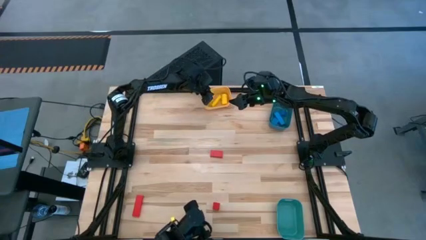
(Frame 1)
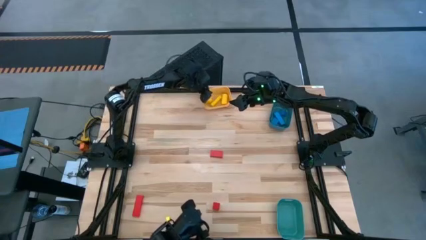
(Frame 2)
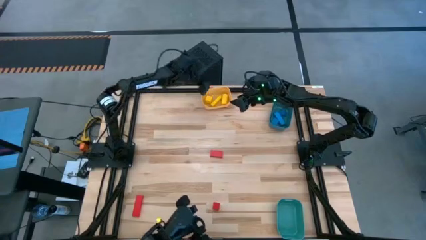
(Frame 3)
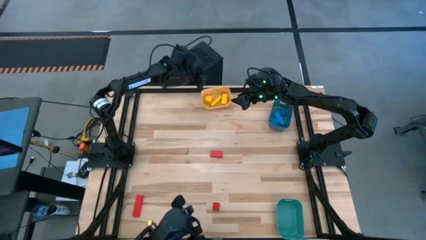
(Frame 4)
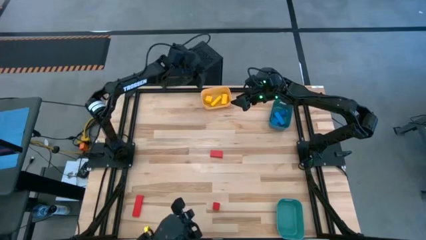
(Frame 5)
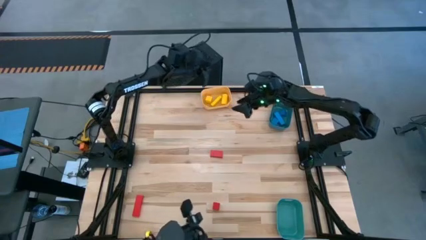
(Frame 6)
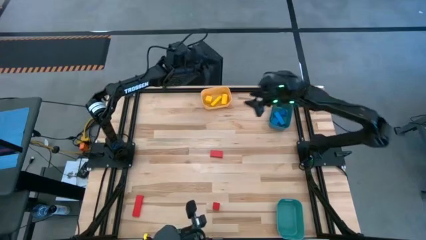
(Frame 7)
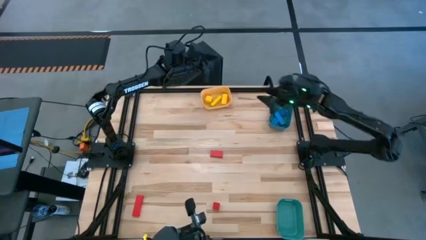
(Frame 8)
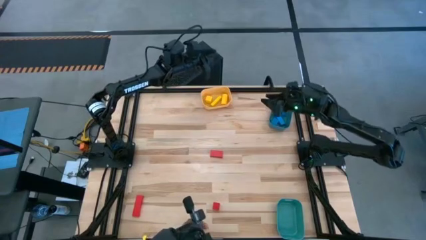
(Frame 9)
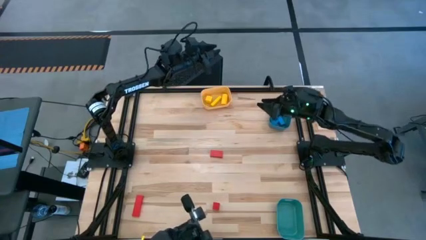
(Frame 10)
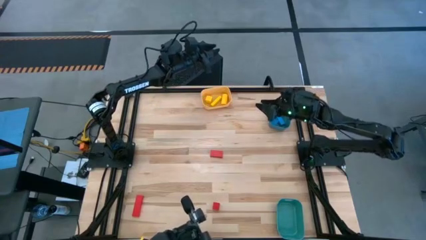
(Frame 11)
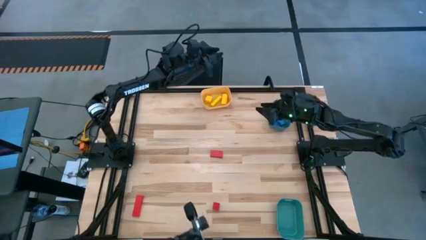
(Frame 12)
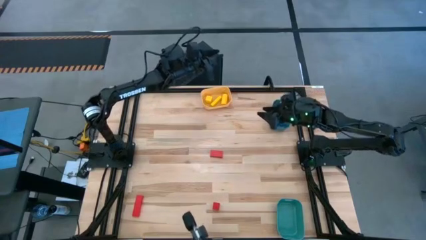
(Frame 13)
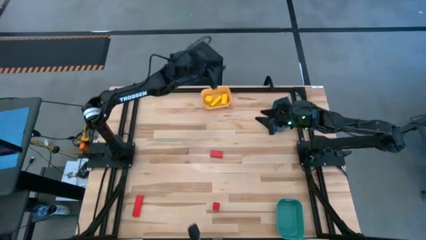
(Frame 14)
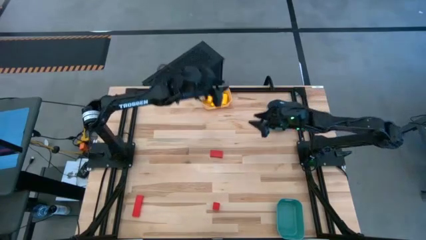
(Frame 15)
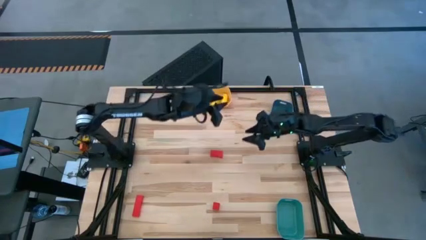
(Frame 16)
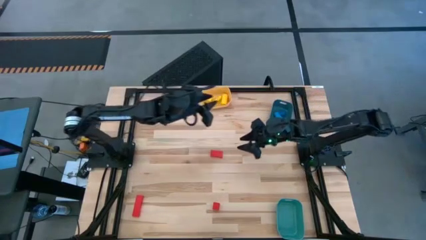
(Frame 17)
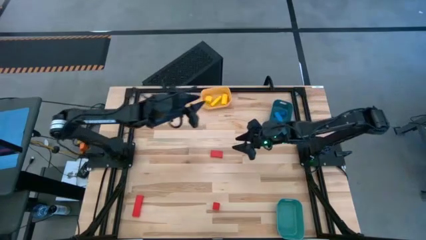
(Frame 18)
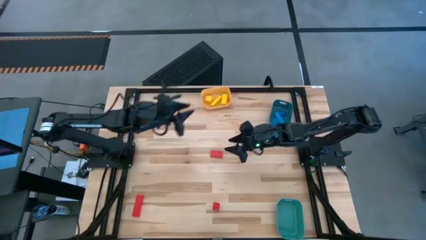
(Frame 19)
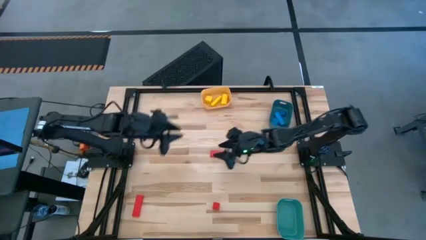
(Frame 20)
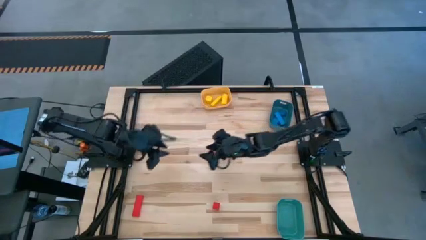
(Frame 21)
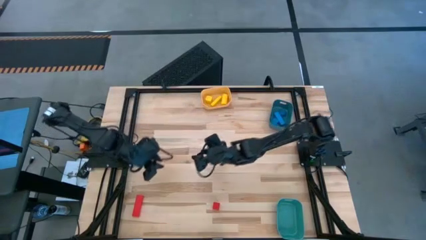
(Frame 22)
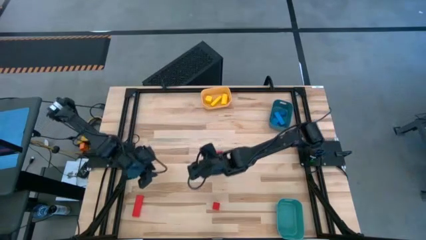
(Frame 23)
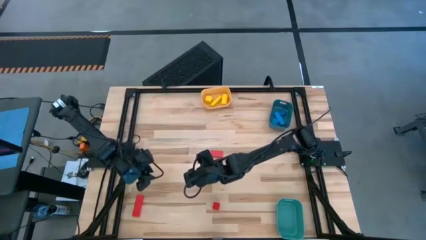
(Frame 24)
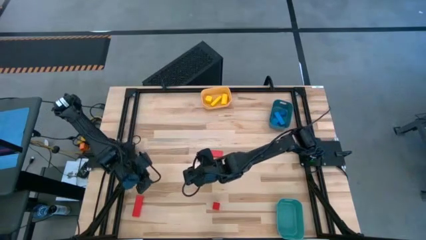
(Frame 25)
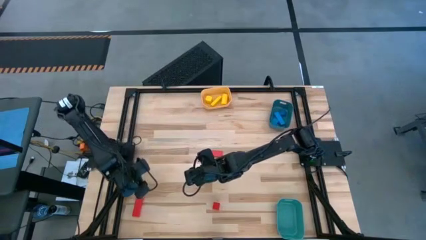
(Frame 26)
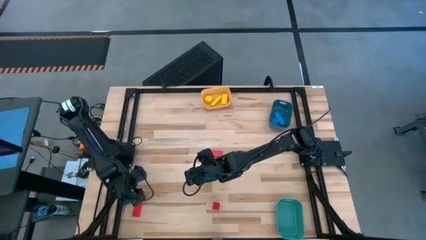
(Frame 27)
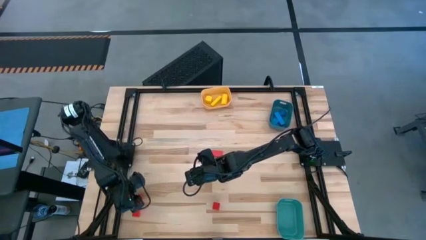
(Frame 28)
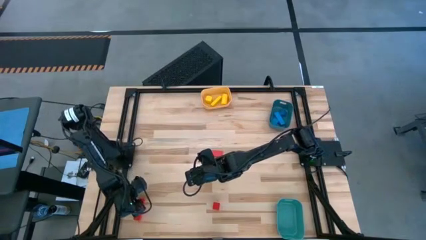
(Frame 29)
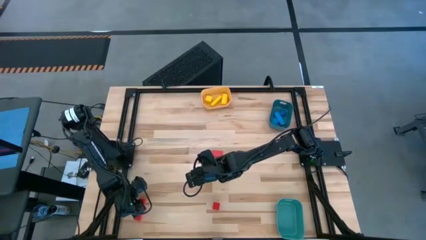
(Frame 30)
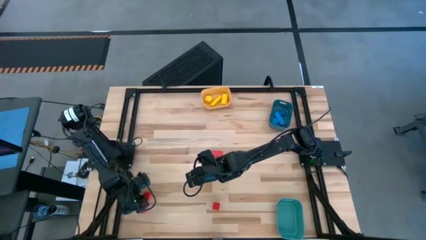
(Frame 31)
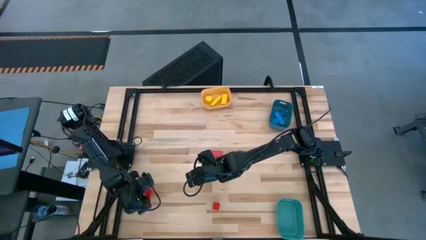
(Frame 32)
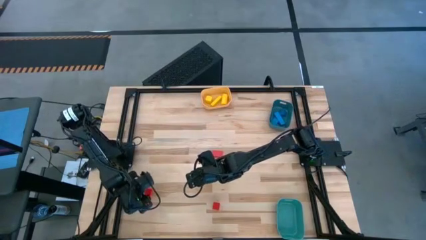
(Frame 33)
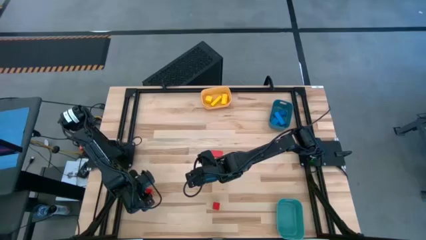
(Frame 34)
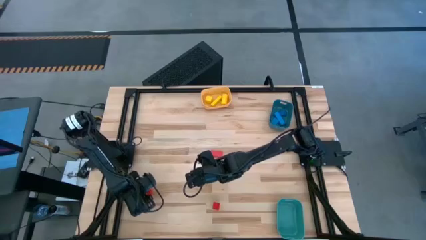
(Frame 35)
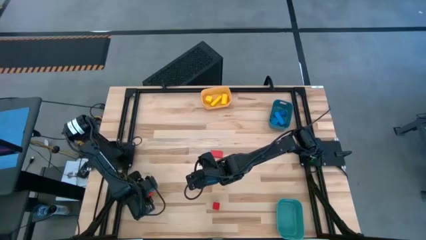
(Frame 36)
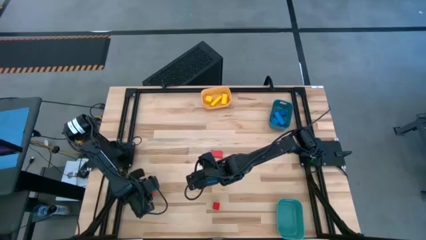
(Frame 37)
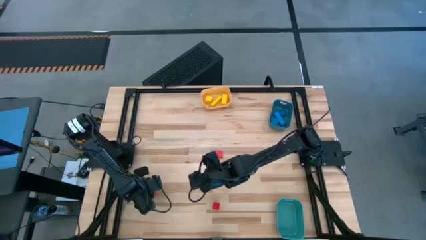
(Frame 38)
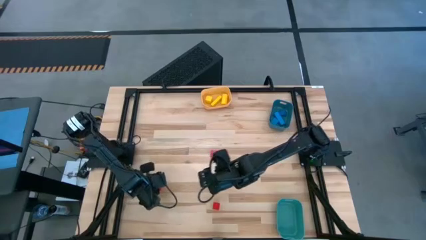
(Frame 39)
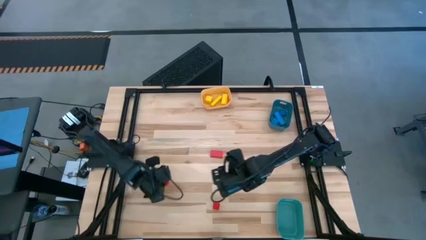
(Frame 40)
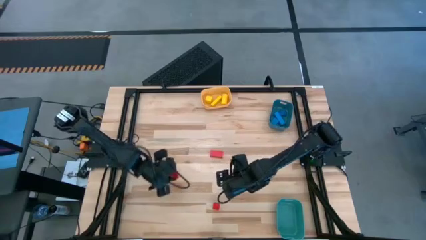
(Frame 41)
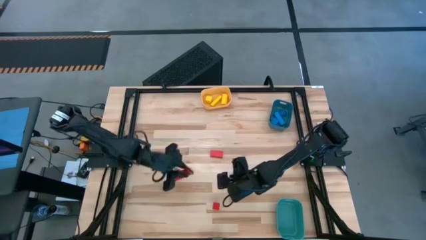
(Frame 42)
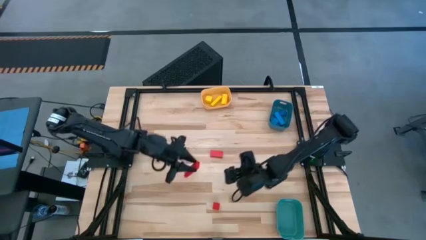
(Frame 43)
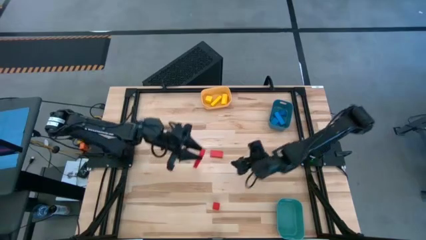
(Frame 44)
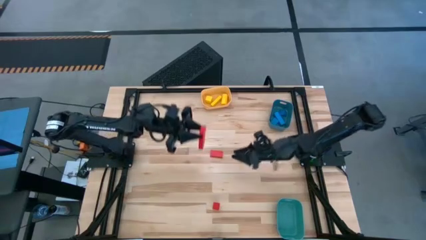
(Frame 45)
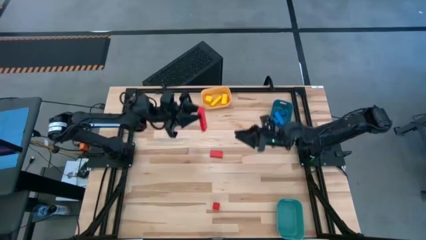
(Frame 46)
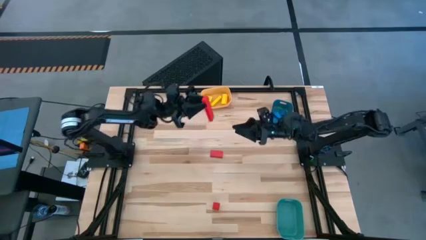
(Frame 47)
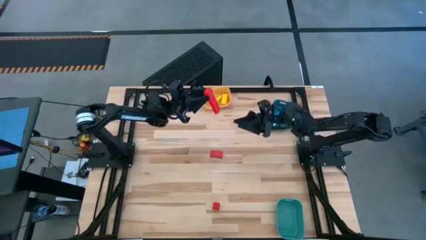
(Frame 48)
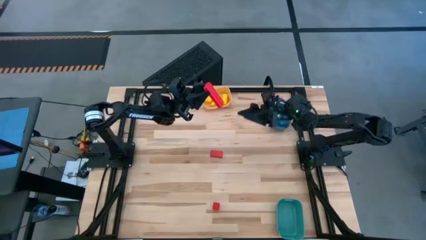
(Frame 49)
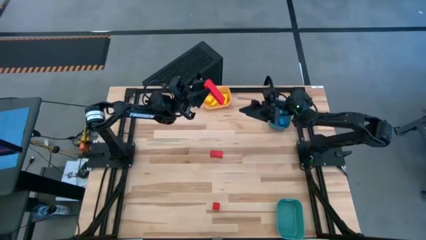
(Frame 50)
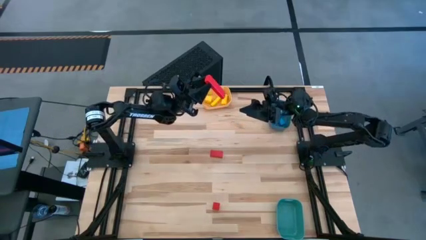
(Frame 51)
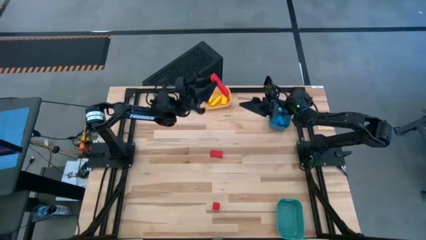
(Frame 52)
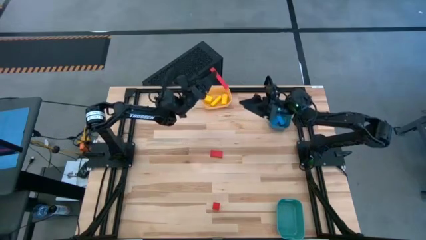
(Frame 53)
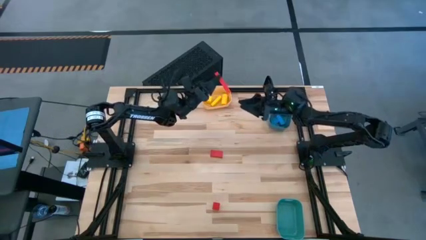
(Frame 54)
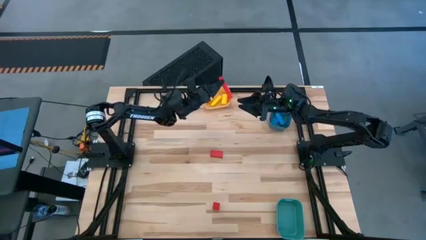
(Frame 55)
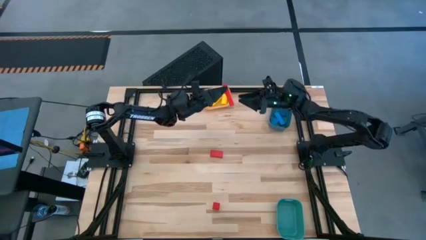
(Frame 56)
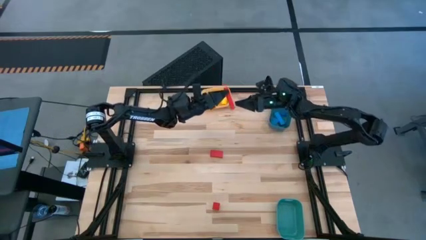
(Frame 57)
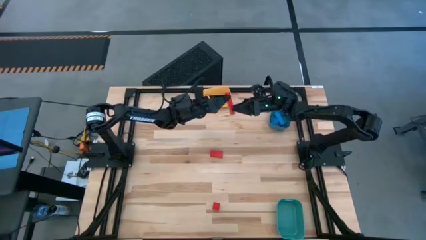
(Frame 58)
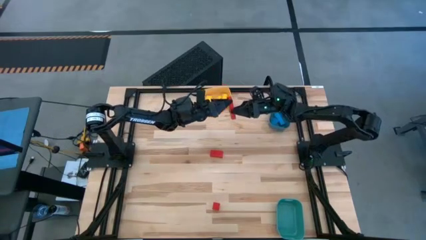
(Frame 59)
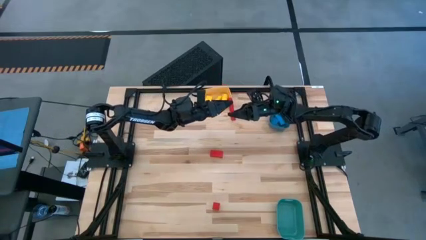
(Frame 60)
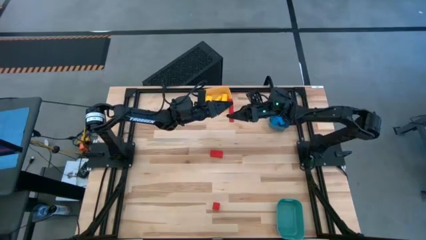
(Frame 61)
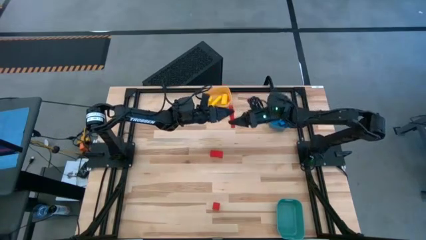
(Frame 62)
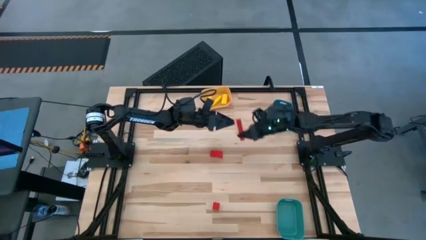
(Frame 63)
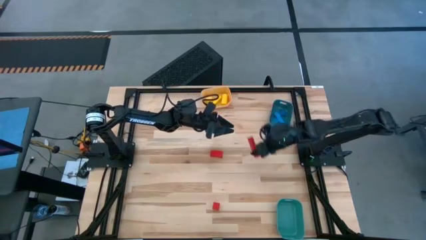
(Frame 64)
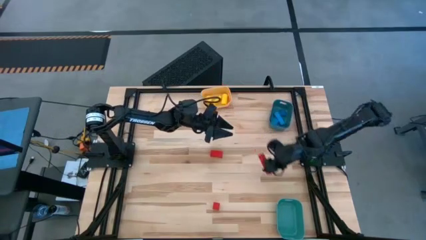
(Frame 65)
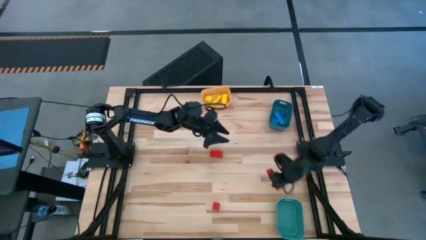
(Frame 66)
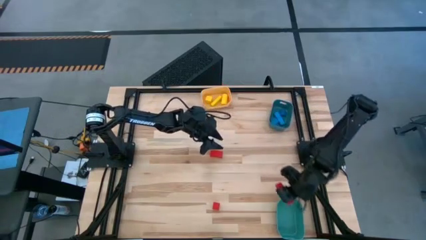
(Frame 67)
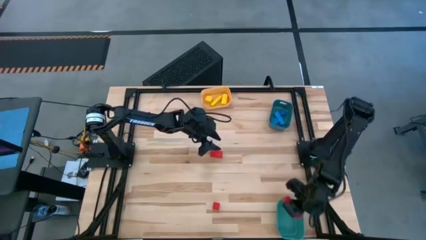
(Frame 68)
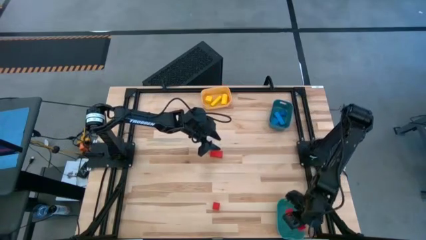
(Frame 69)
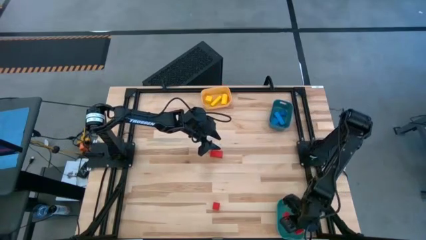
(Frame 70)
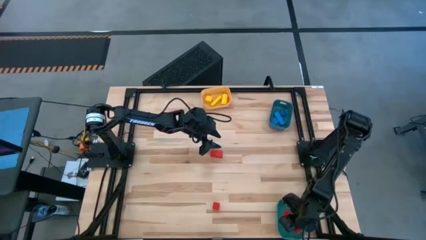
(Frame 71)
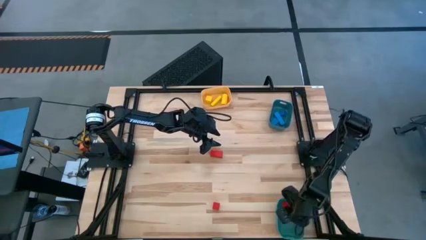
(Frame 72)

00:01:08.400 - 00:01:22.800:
Task: Sort & place blocks by color
Put the bottom left red block into the green bin

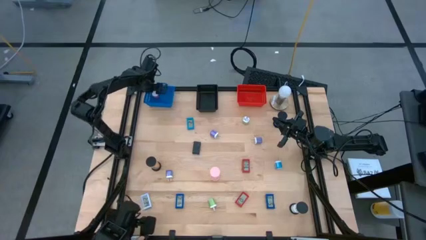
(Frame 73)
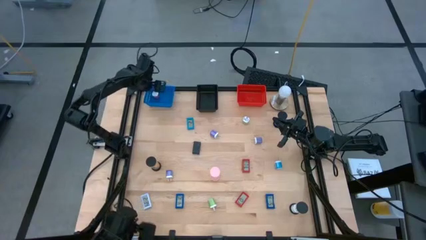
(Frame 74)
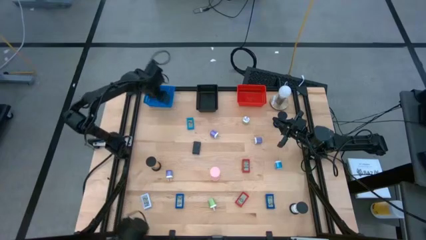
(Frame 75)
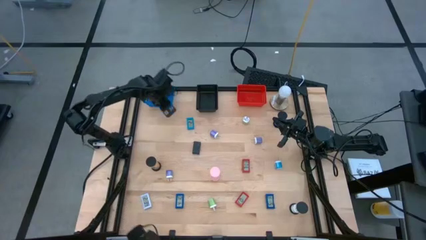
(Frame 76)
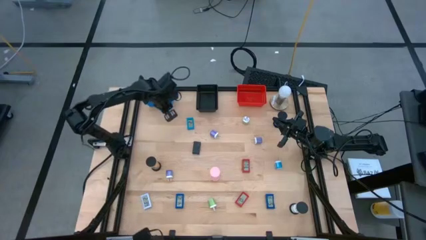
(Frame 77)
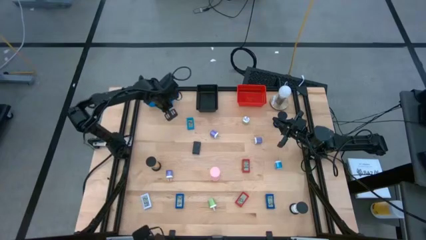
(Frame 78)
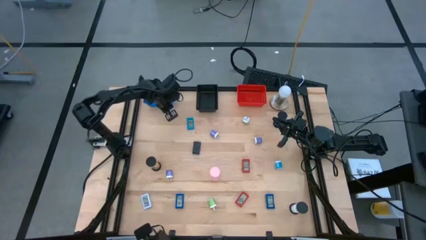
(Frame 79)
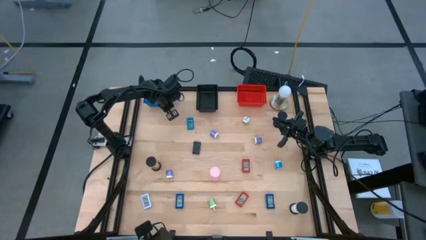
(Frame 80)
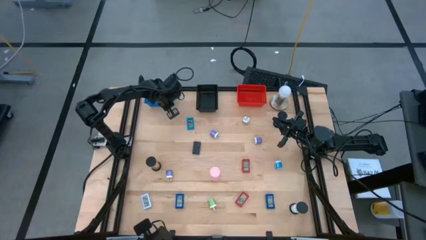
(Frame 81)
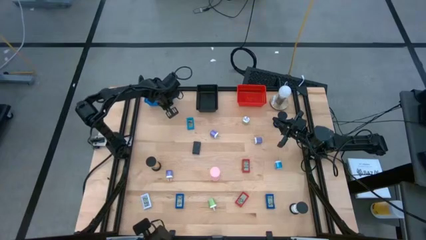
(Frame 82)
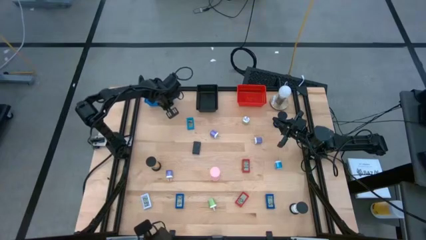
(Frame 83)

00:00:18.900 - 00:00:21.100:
Task: Pick & Place Office items
Adjust the blue bin
